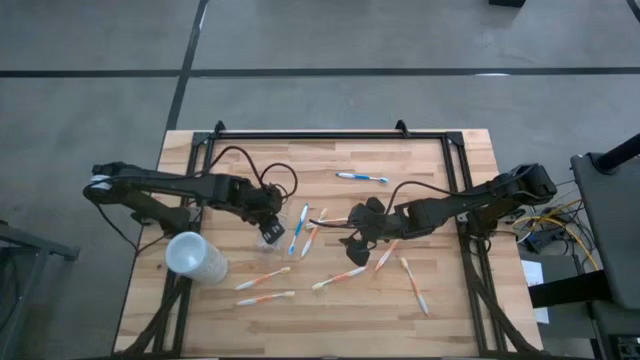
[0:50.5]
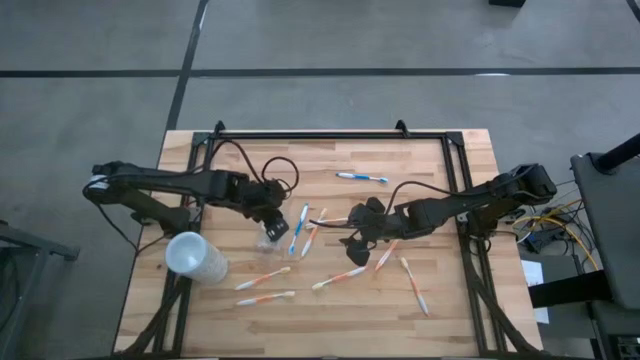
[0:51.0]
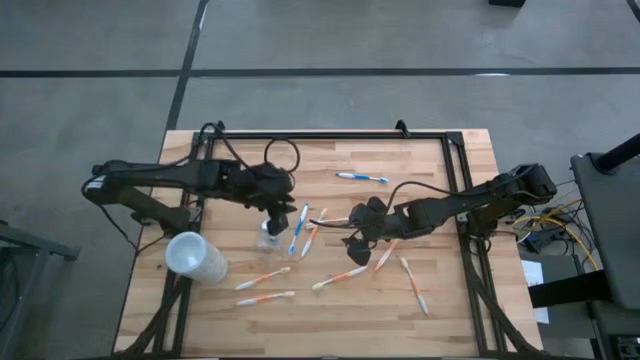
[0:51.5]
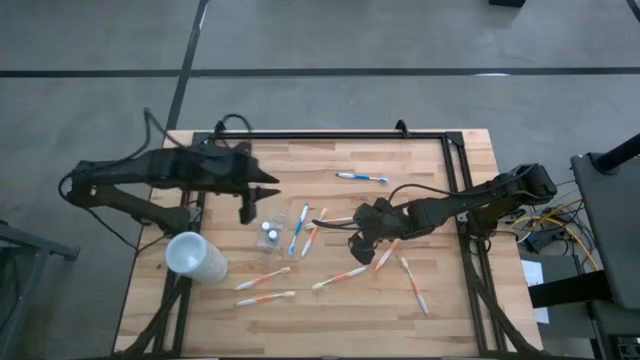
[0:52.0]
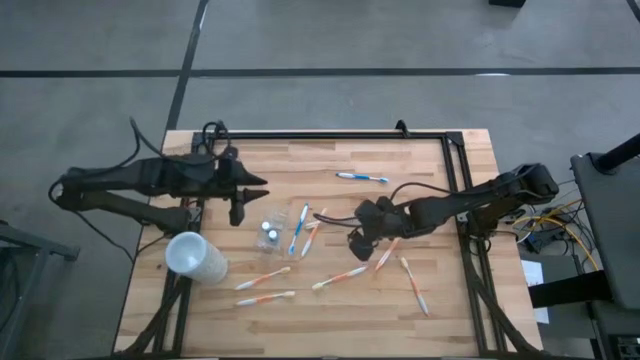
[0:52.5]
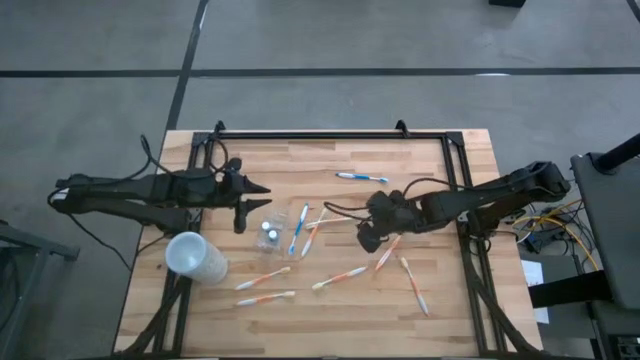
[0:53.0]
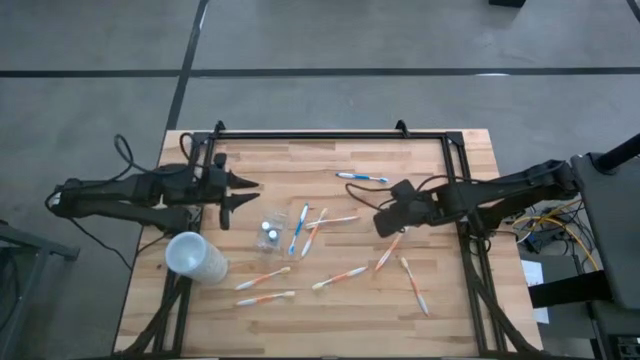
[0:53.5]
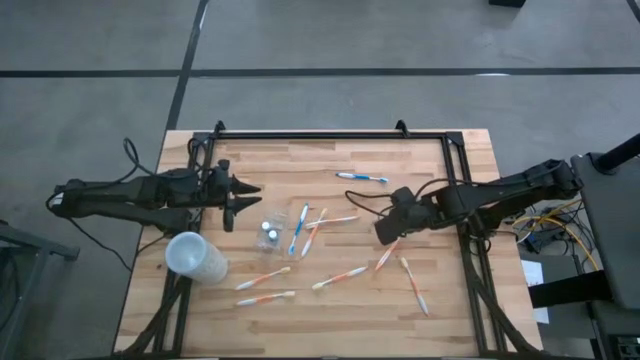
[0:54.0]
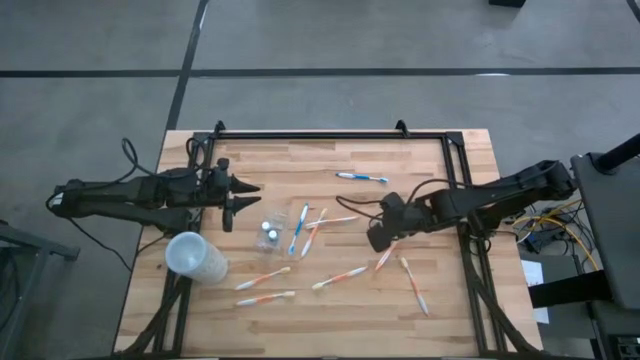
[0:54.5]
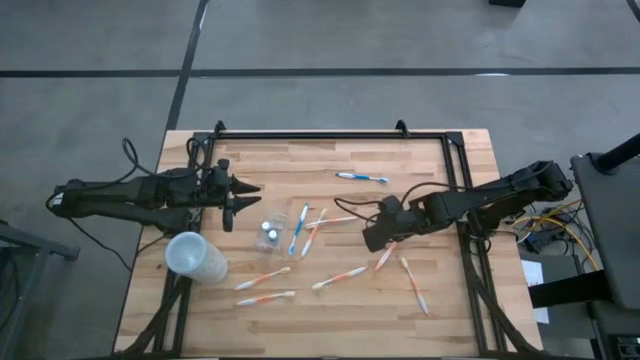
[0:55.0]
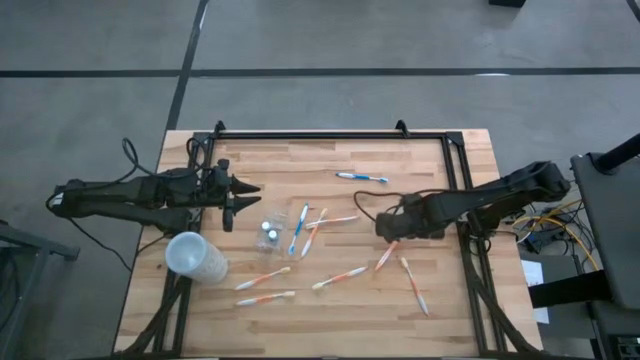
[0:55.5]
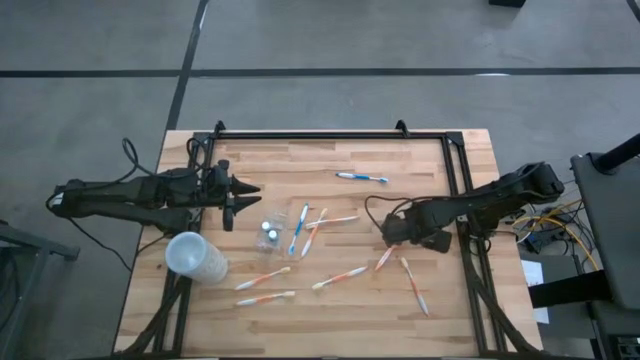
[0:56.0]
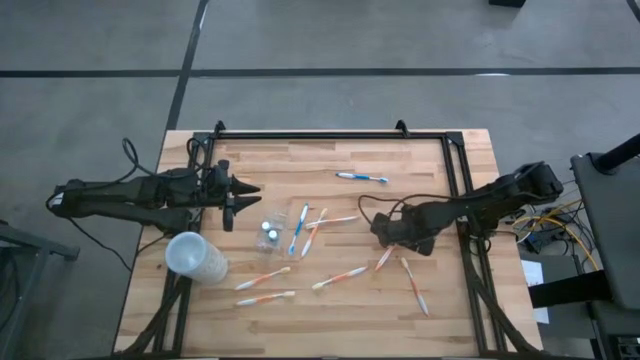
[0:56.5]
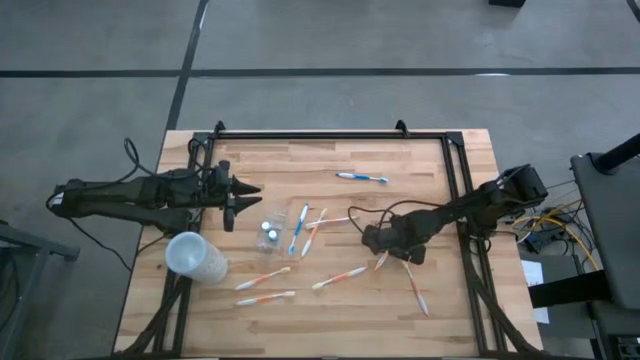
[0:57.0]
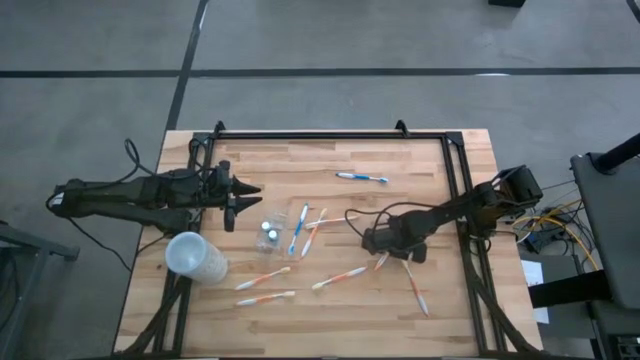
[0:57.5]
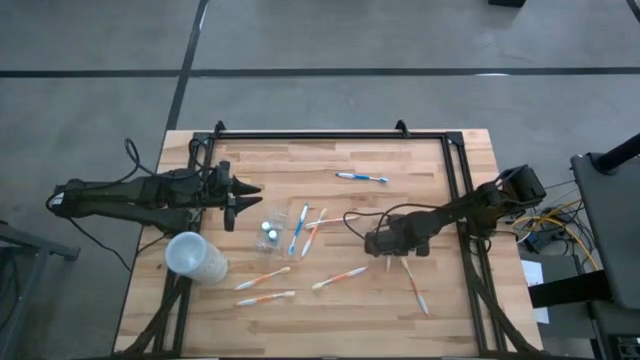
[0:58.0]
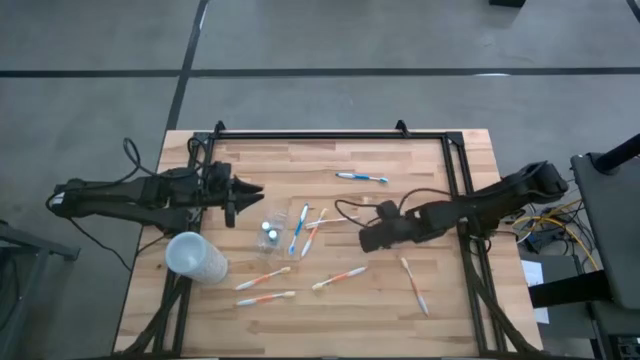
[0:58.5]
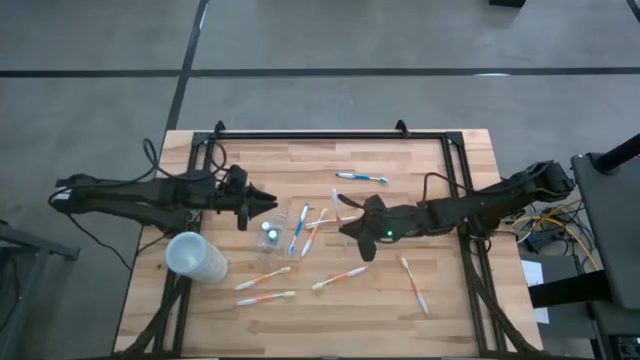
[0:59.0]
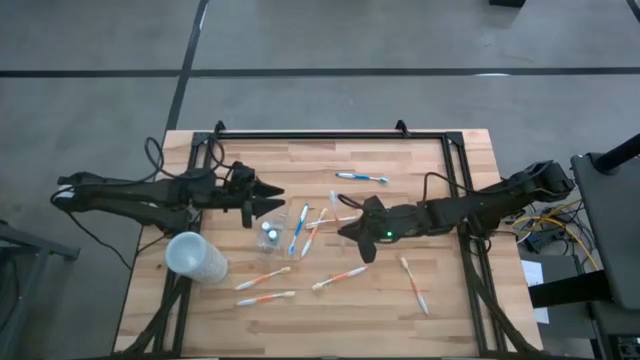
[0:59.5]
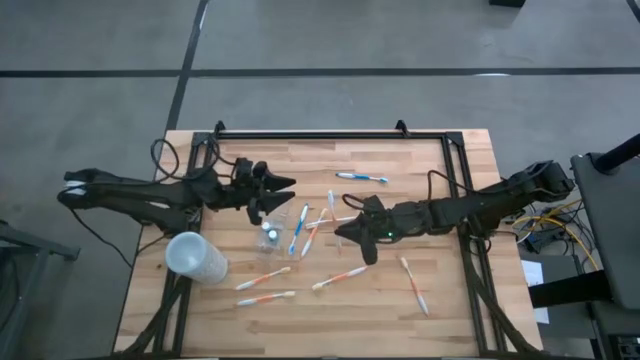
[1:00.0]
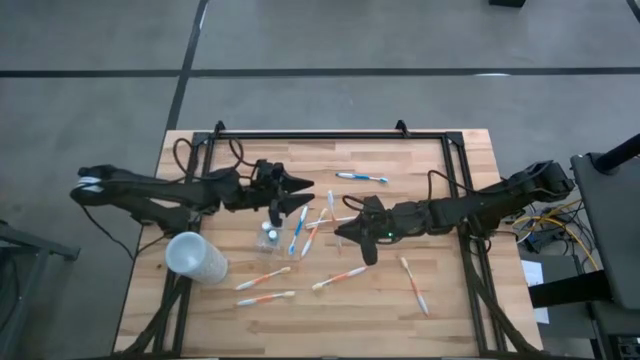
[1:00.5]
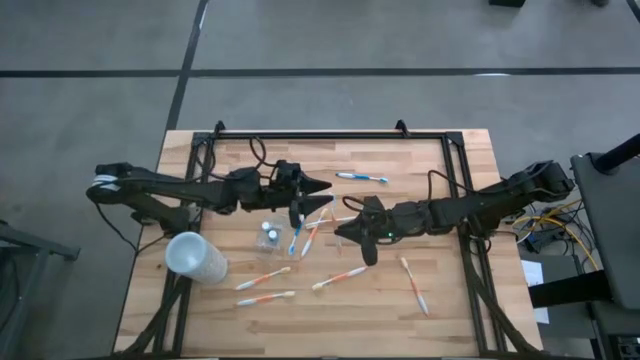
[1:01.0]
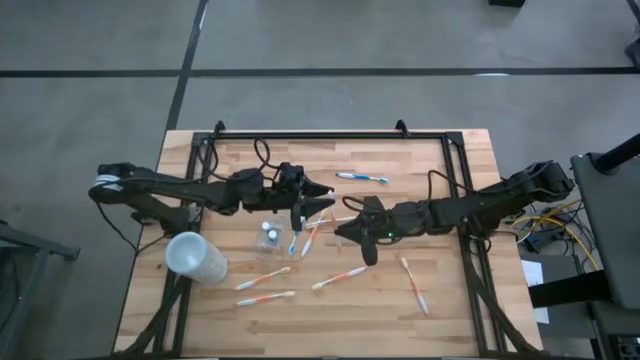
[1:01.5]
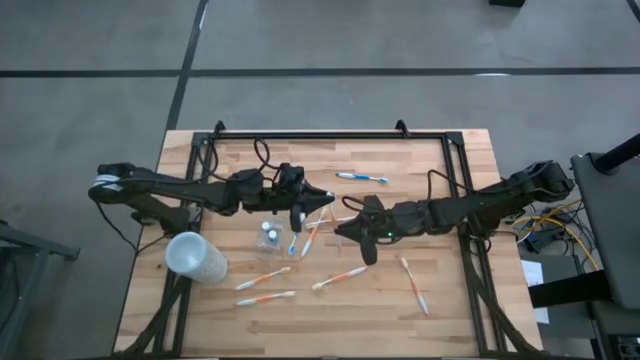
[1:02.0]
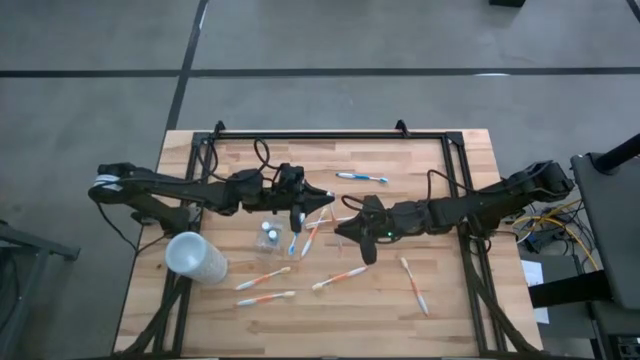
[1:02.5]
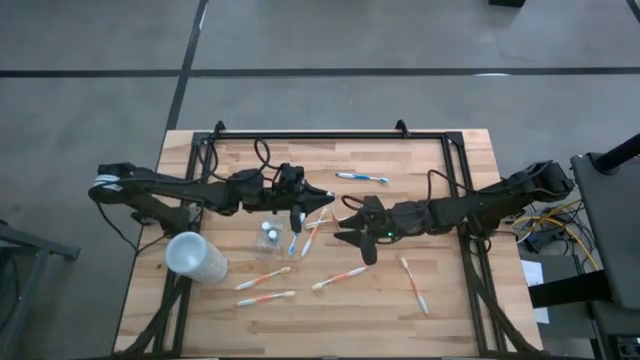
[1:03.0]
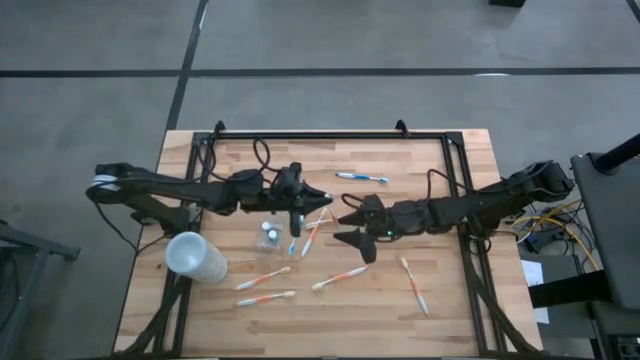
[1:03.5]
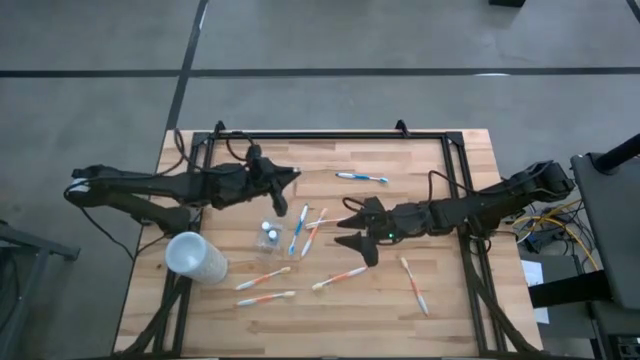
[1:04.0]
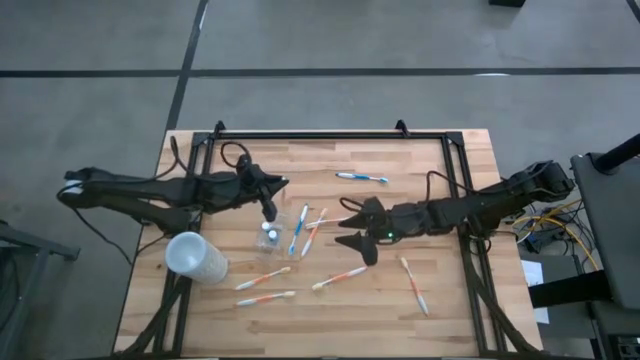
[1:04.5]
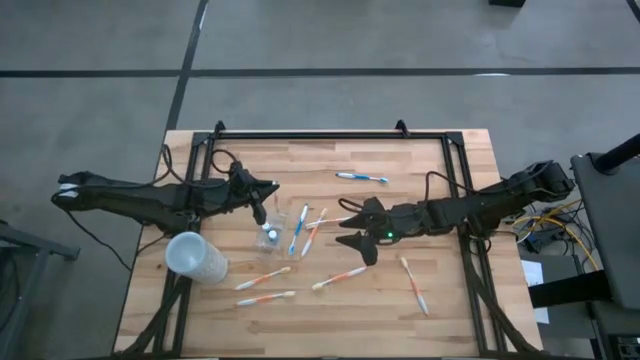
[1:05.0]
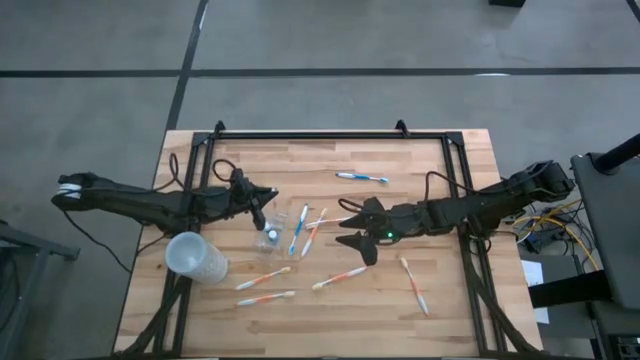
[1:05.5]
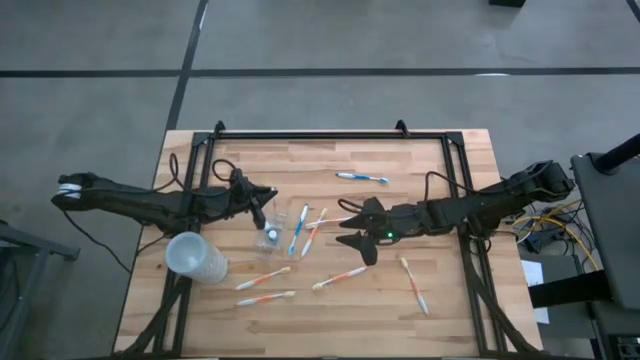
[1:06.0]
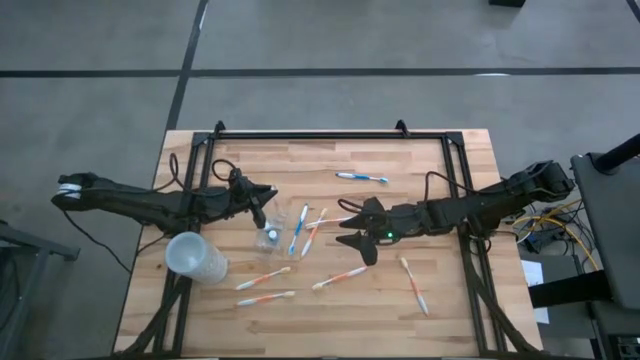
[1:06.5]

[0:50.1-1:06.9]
Task: Pick & Place toothbrushing station
Put the orange toothbrush into the transparent organizer

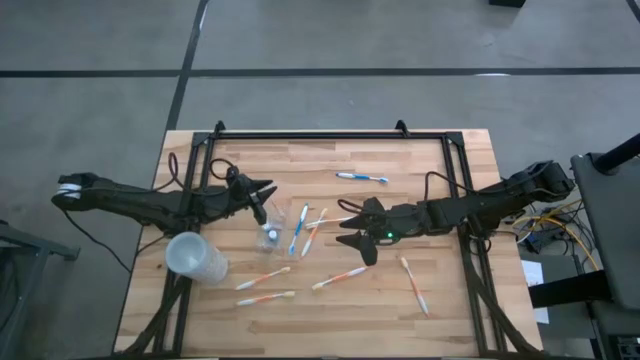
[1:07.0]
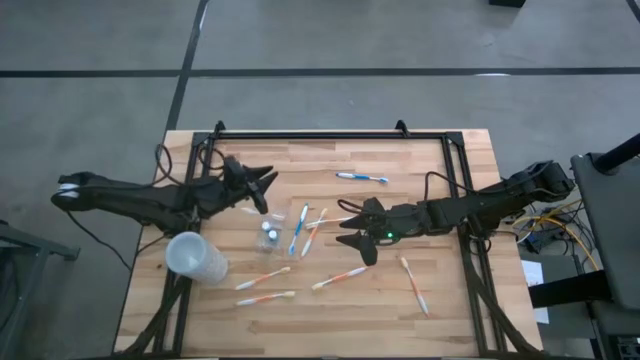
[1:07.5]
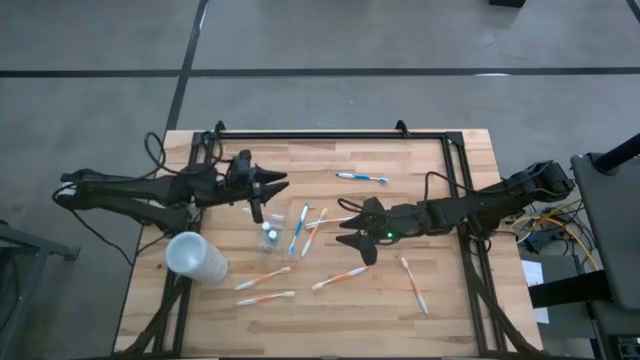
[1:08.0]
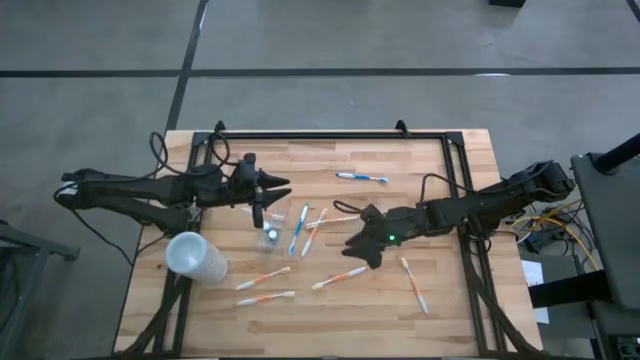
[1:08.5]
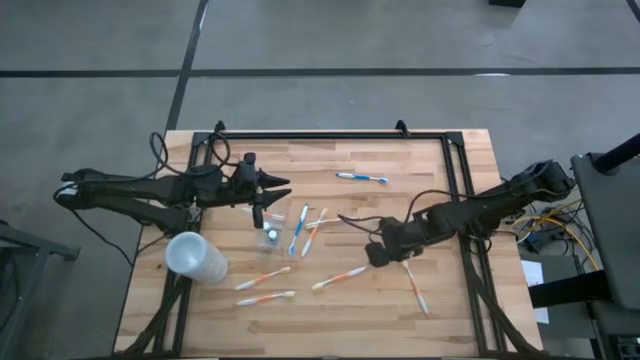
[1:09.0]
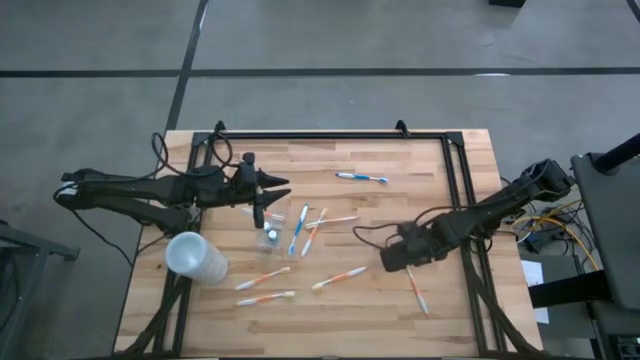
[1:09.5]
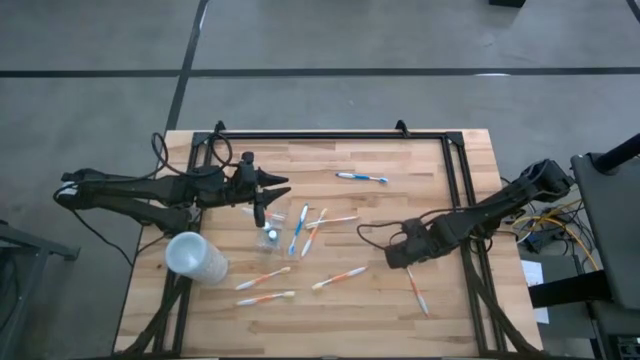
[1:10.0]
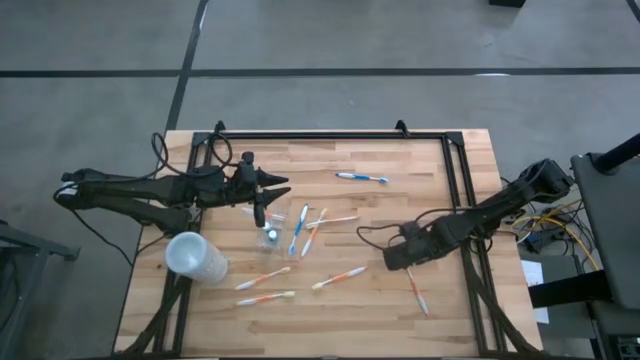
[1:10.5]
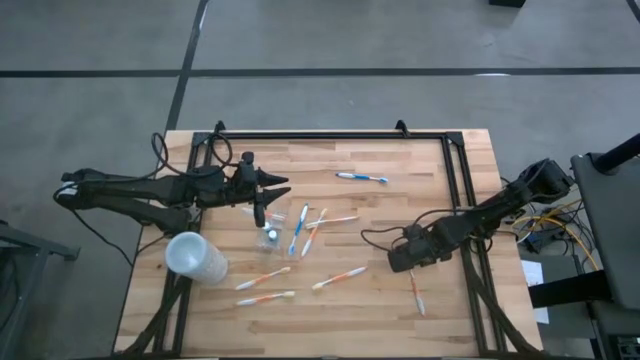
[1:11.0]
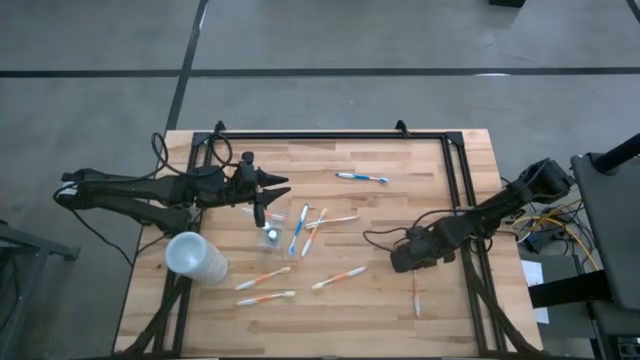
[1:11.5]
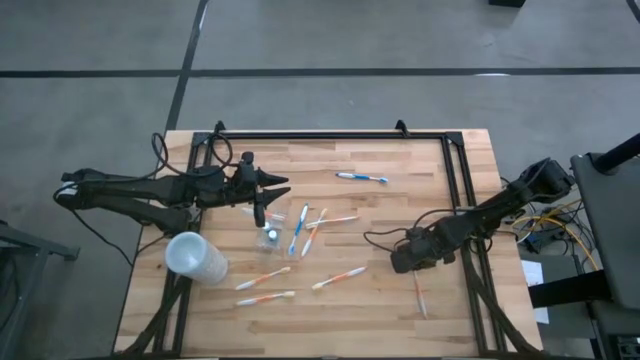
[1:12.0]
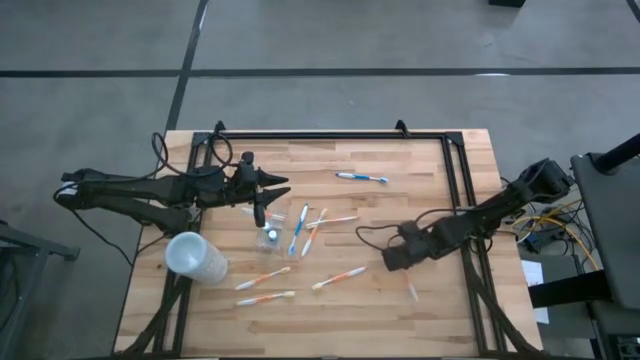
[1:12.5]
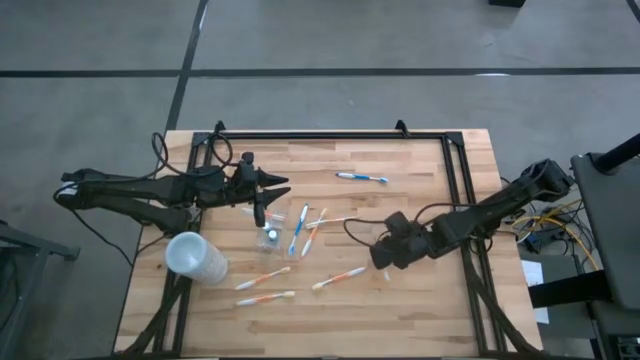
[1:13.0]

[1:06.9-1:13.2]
Put the orange toothbrush into the transparent organizer
